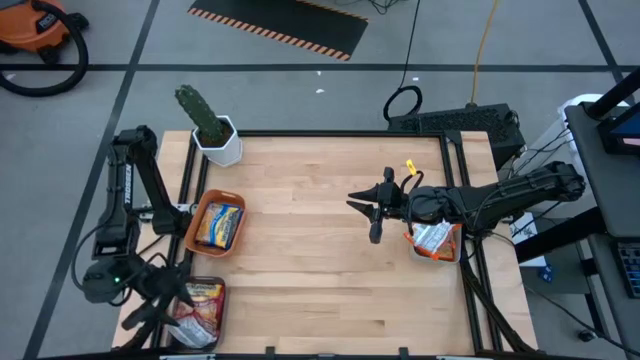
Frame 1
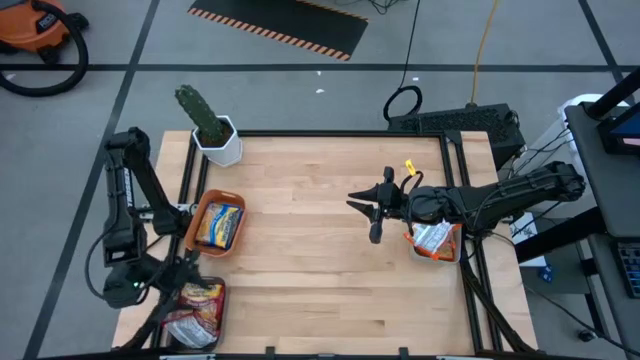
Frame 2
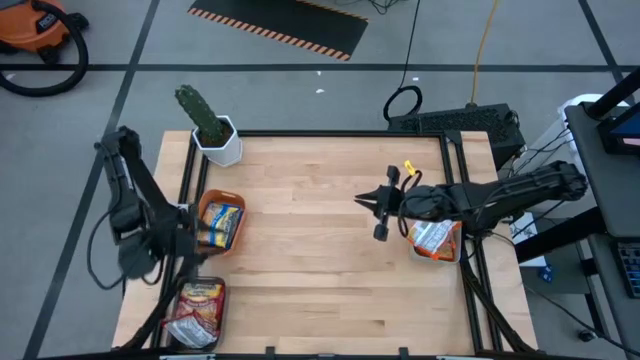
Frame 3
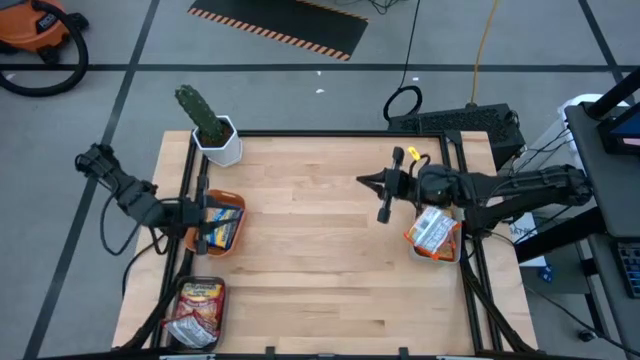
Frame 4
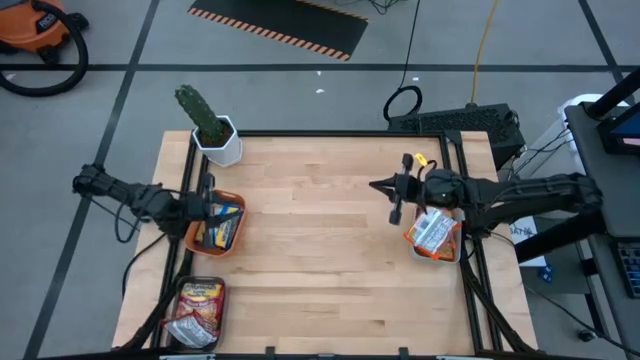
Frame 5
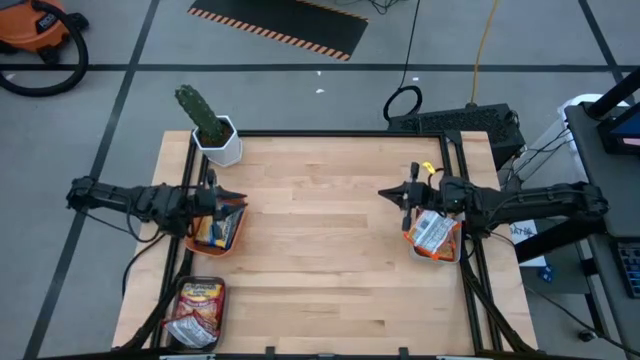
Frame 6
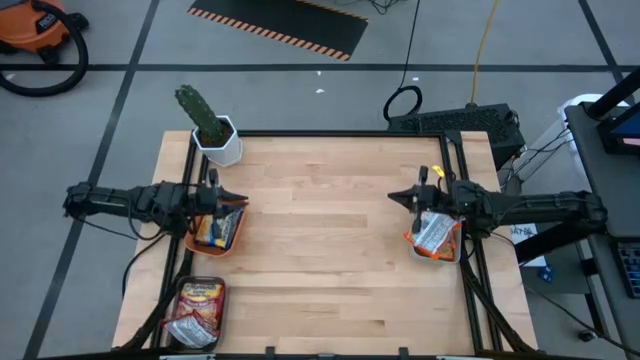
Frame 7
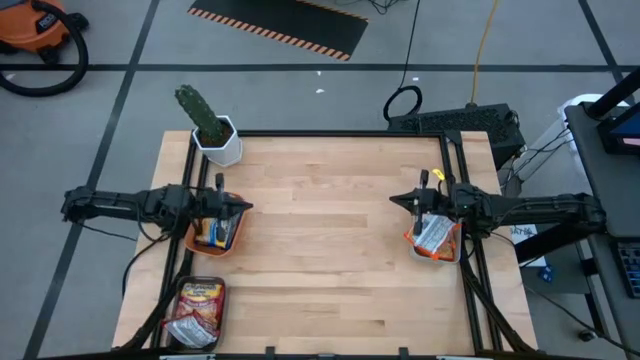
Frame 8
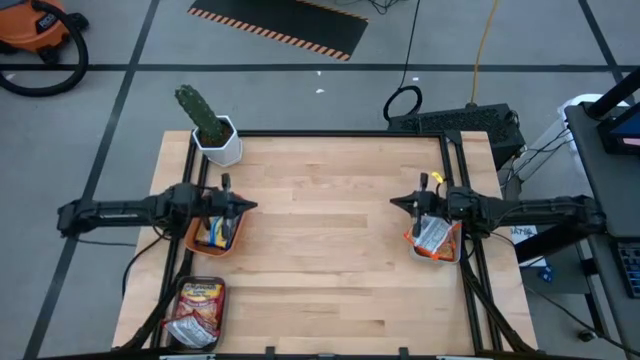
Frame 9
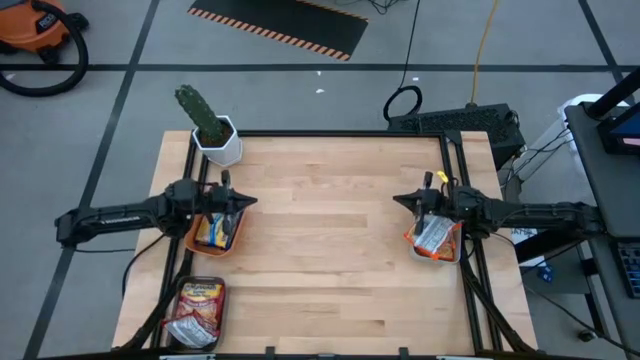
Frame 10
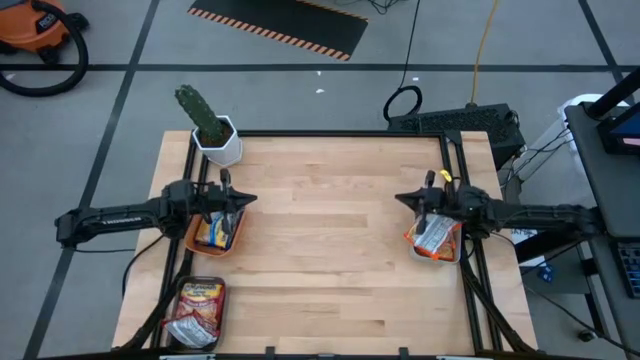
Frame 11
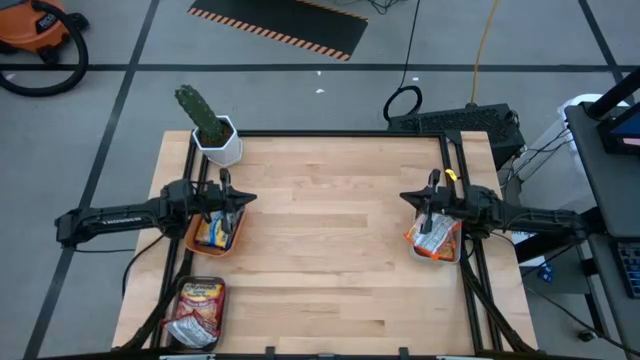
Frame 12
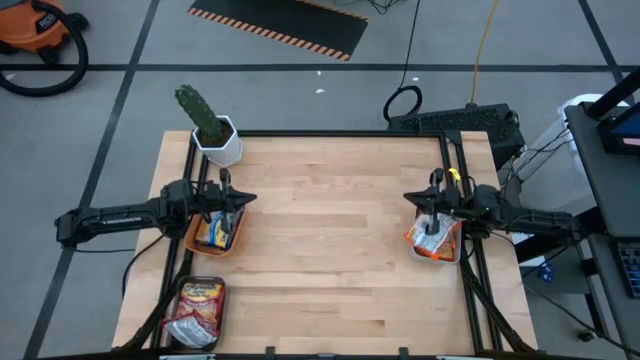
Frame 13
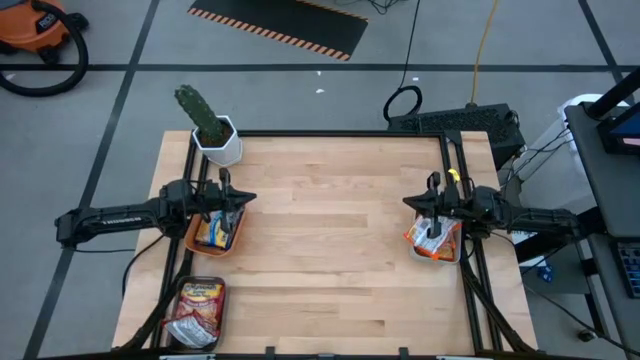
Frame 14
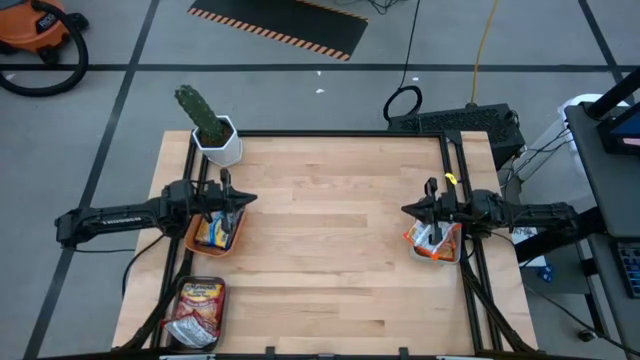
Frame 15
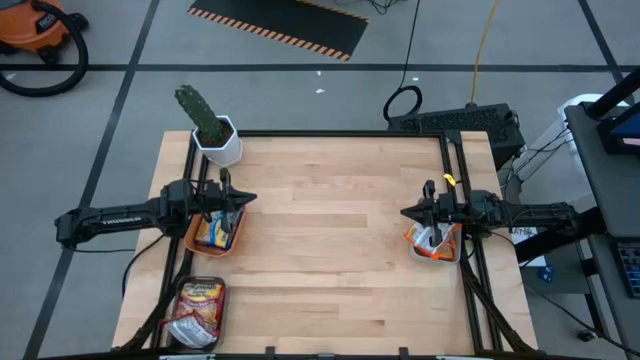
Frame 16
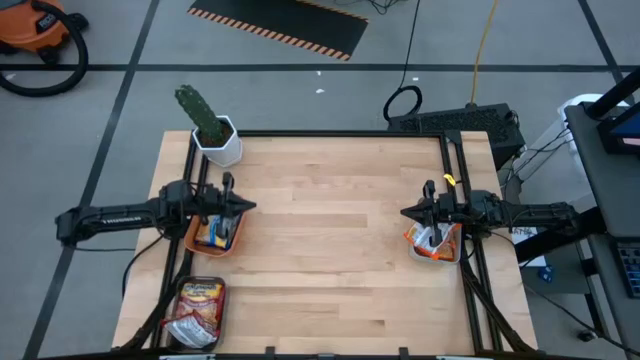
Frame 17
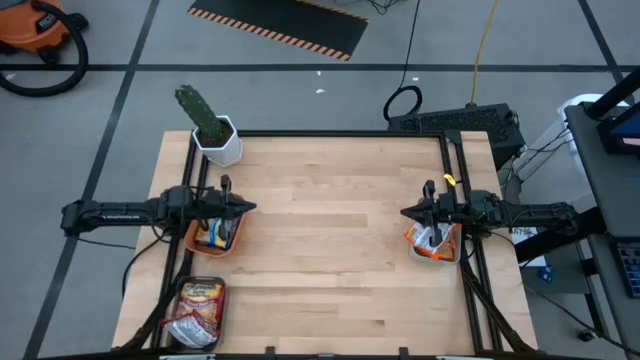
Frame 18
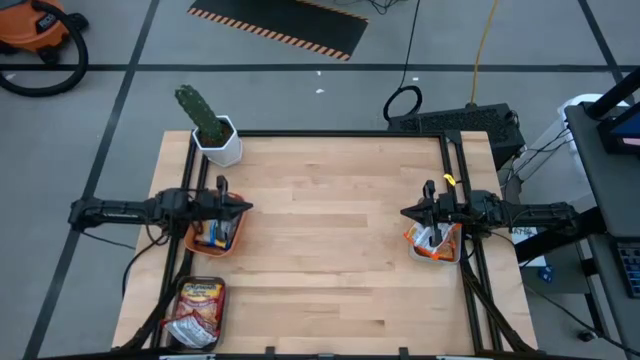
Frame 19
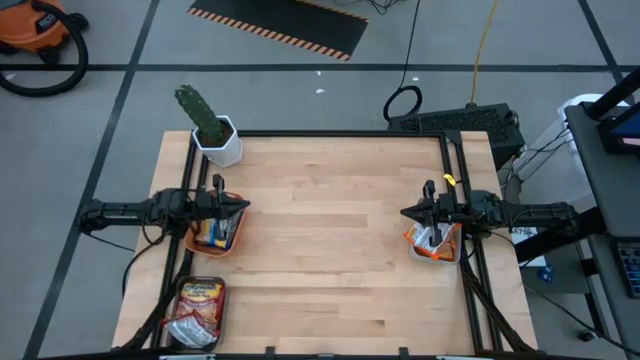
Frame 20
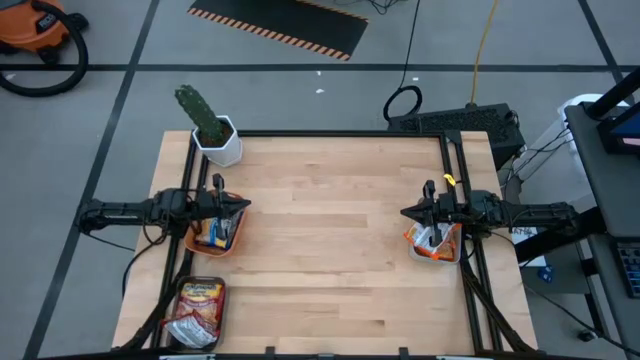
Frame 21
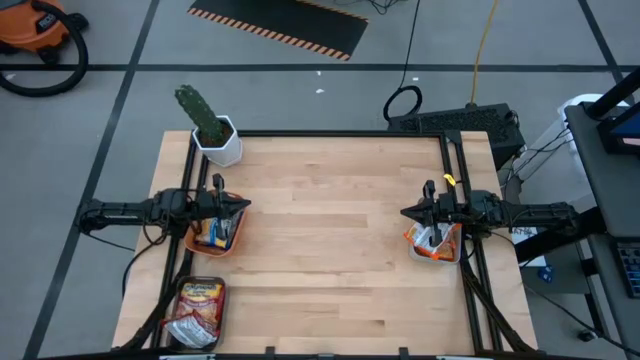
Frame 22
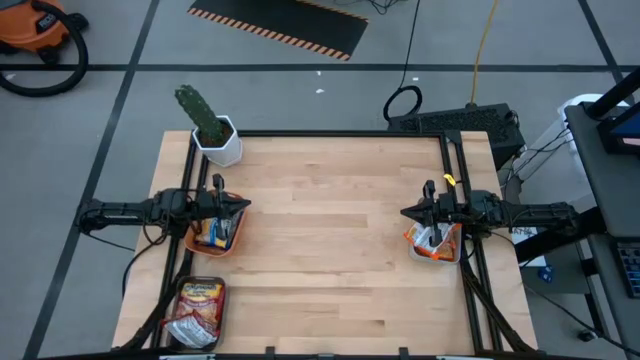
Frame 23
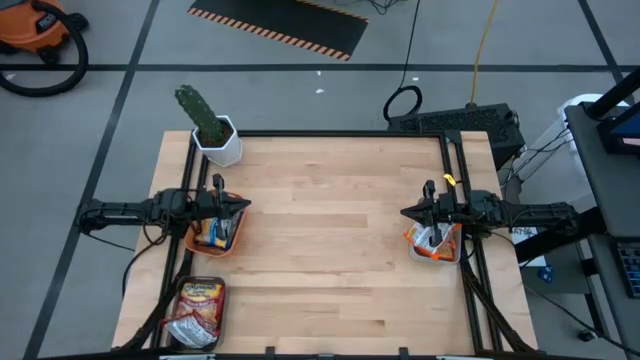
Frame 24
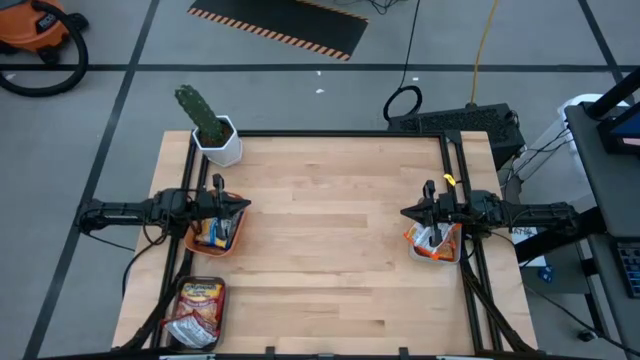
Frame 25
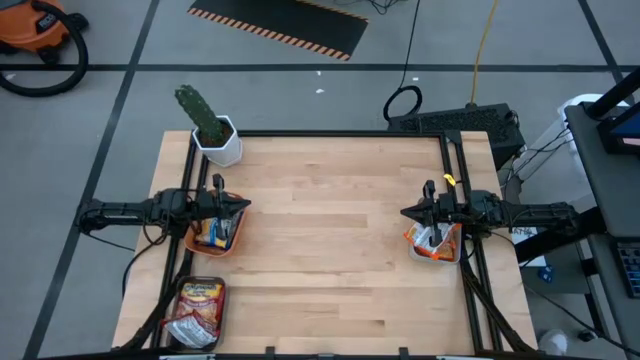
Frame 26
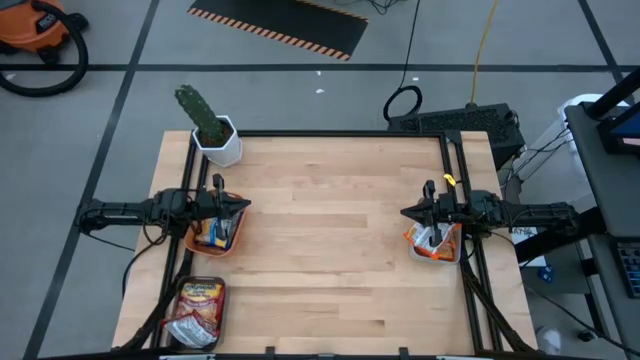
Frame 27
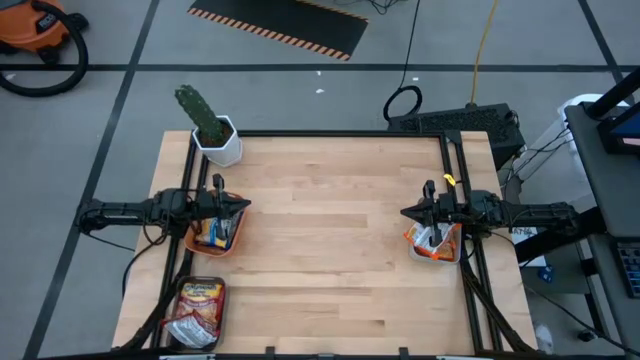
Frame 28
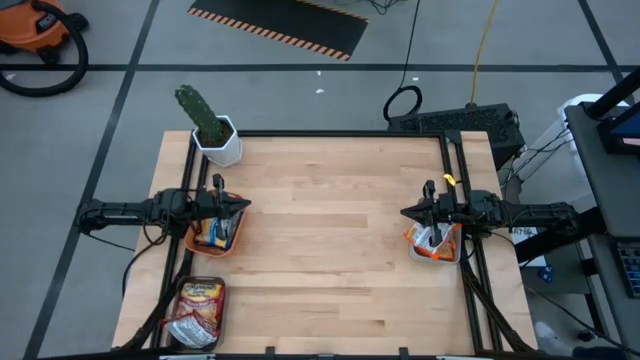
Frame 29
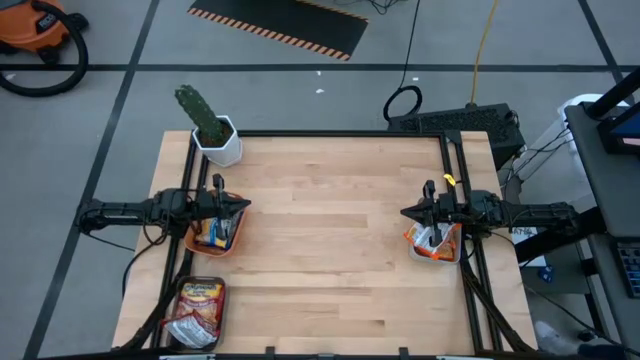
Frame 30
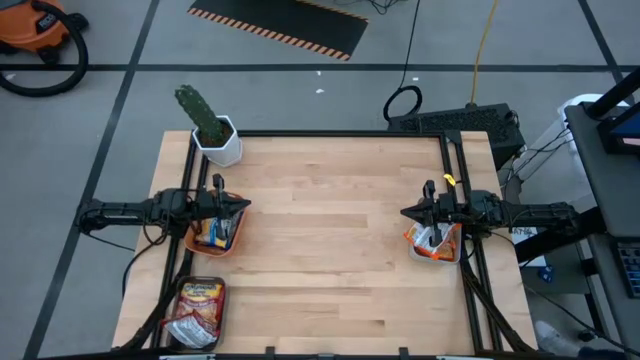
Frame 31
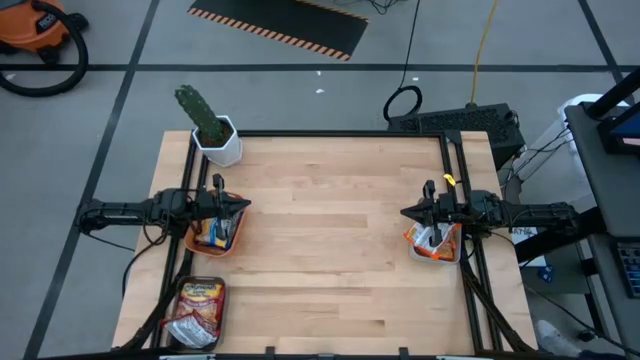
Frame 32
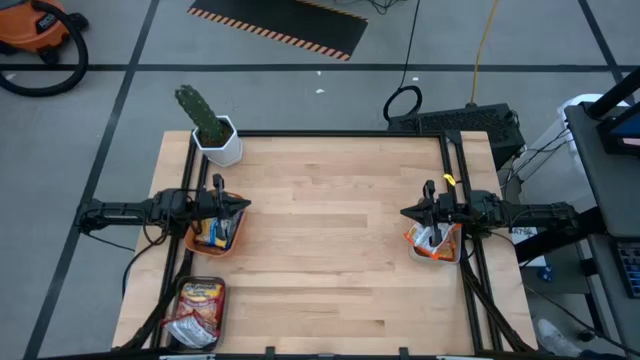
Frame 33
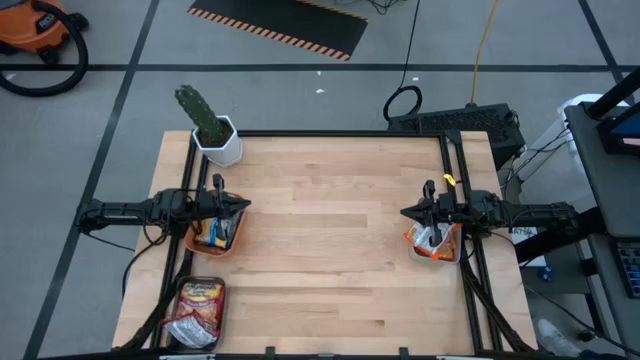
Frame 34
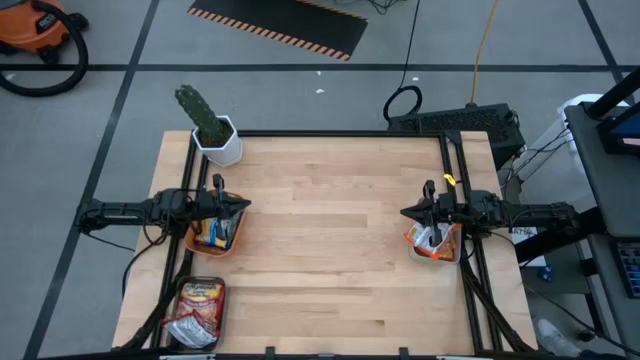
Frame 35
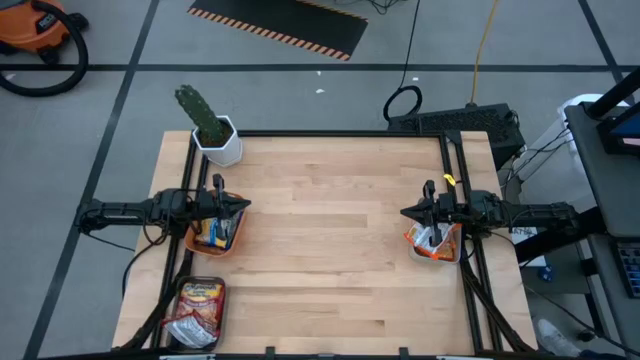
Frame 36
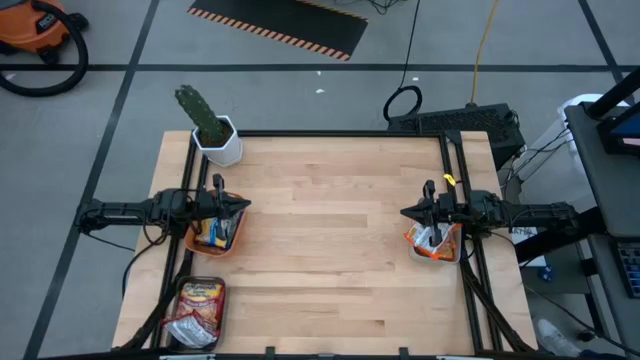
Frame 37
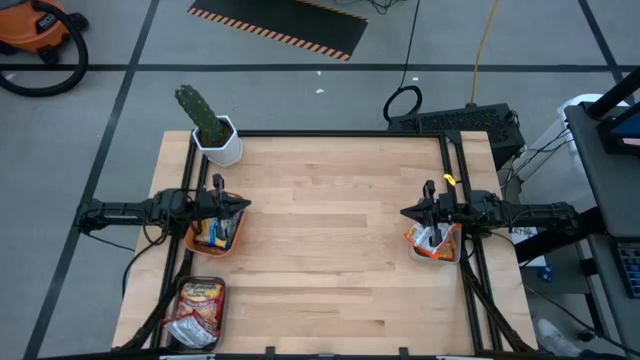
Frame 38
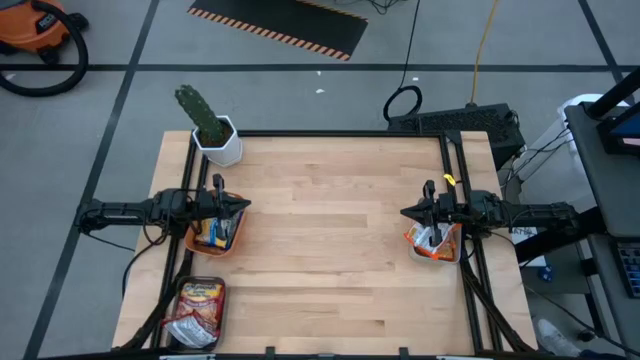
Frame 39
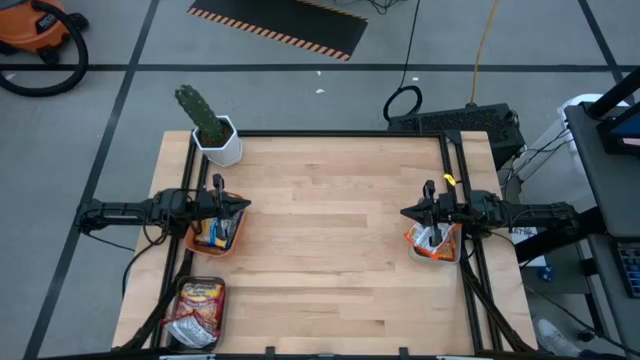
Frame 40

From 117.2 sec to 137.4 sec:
Task: Sort Maruchan noodles
Return to Home Position

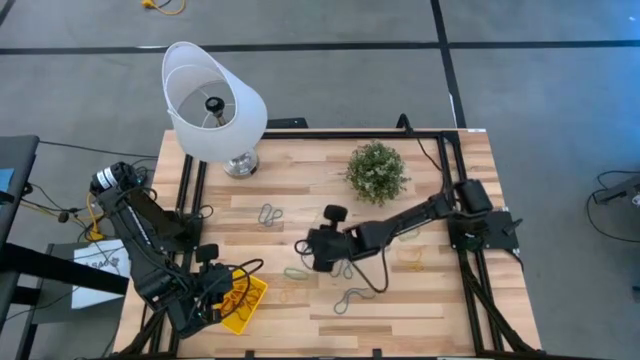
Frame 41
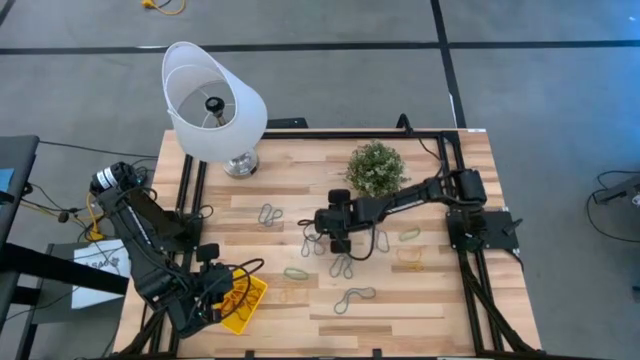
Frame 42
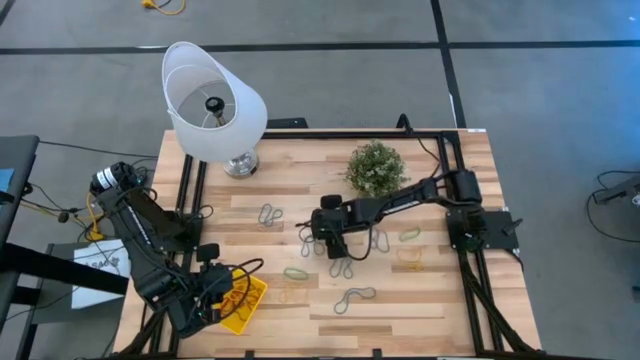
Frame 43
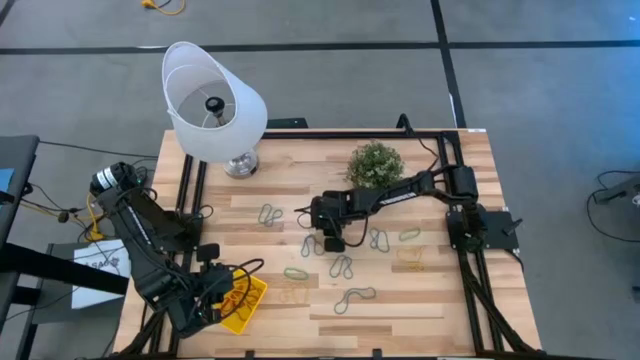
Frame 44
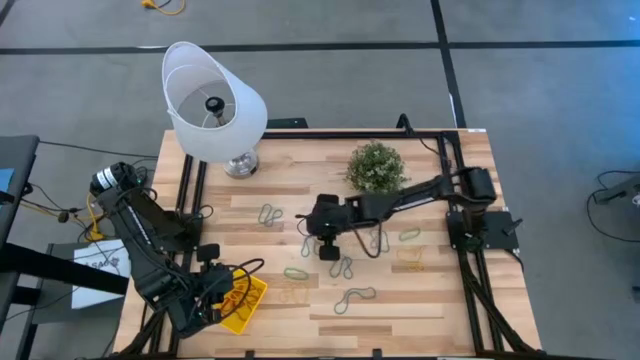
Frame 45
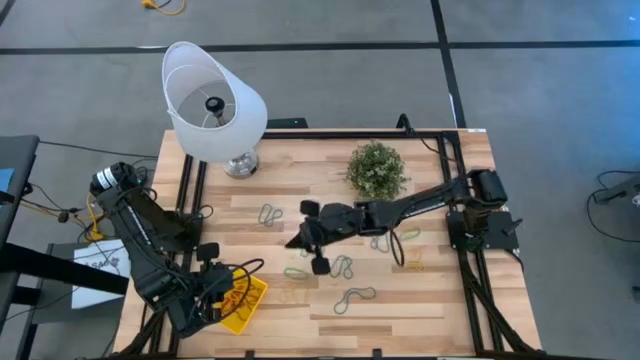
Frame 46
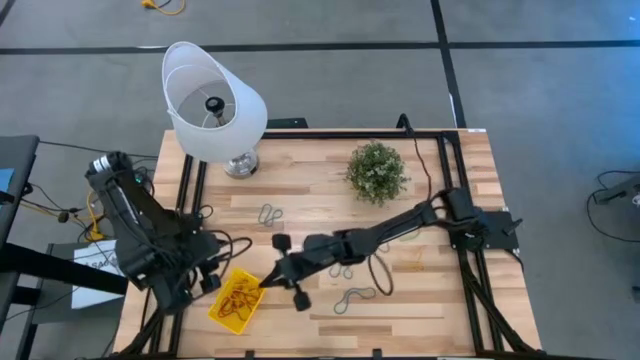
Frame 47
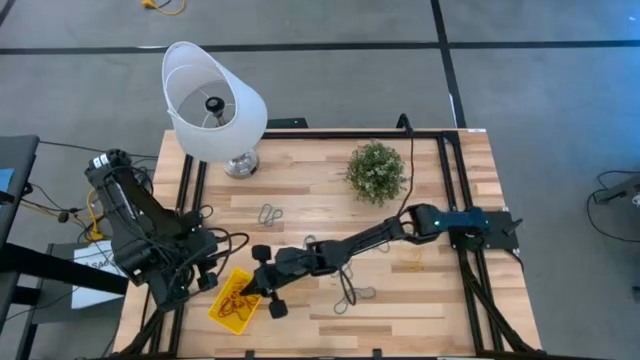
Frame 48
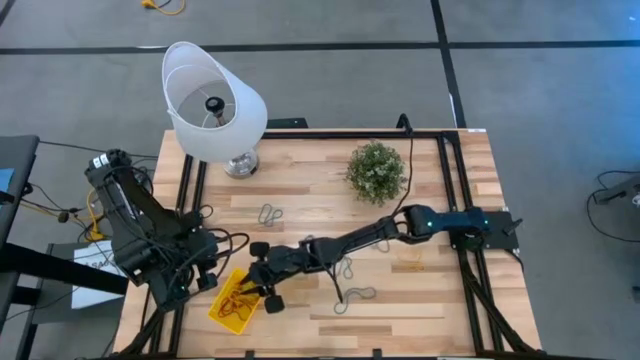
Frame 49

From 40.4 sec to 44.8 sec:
Task: Pick and place items into bin
Put the top yellow rubberband into the yellow bin
